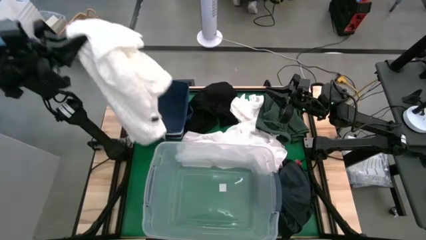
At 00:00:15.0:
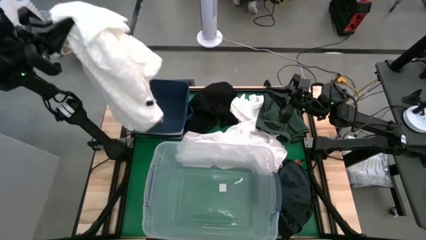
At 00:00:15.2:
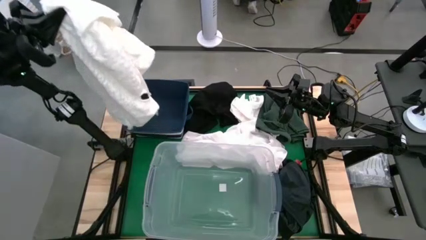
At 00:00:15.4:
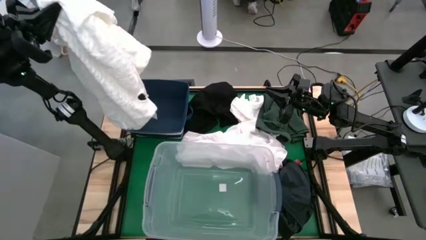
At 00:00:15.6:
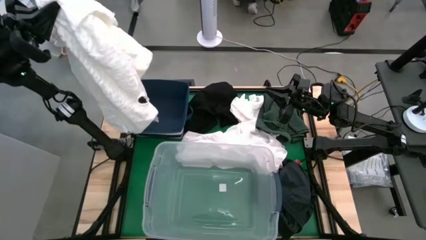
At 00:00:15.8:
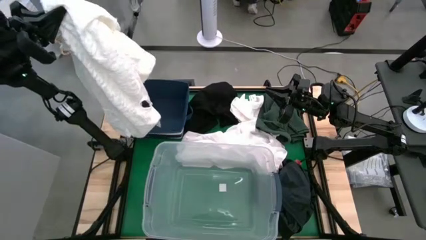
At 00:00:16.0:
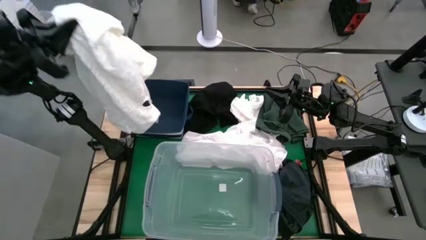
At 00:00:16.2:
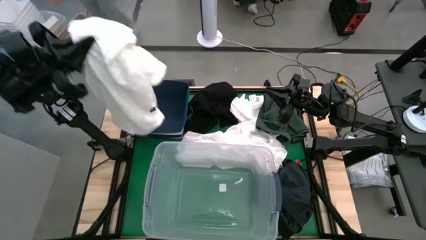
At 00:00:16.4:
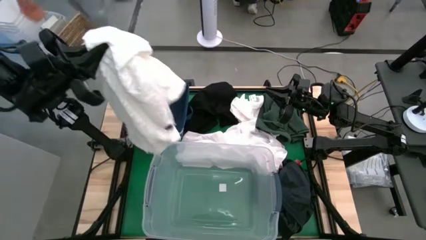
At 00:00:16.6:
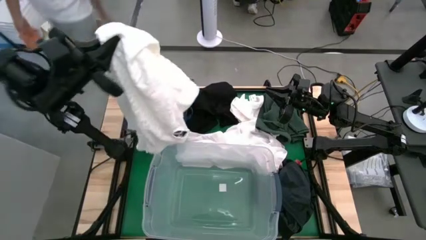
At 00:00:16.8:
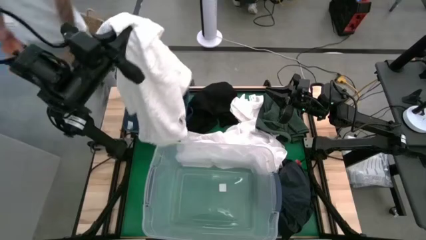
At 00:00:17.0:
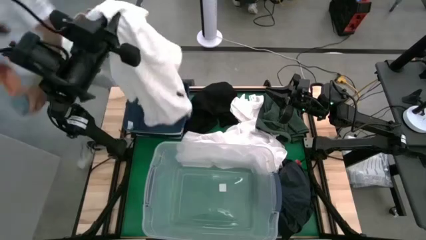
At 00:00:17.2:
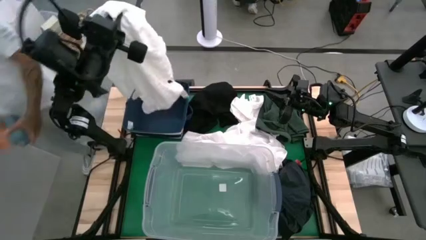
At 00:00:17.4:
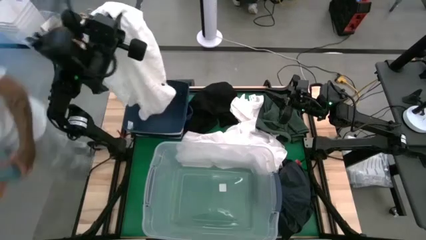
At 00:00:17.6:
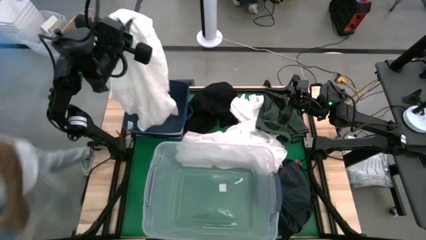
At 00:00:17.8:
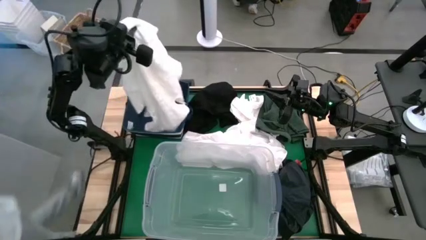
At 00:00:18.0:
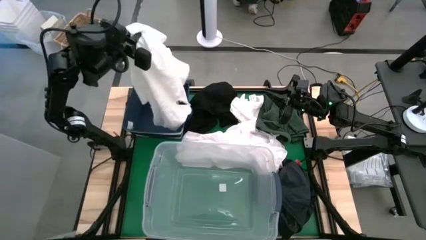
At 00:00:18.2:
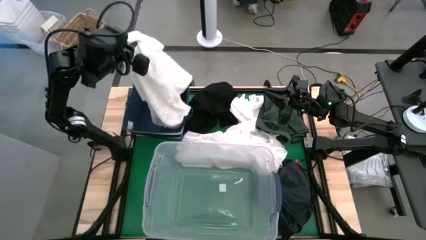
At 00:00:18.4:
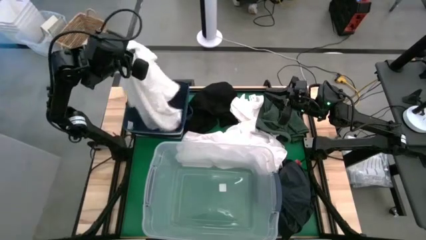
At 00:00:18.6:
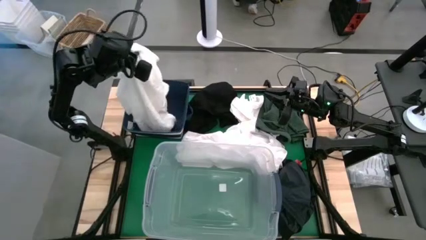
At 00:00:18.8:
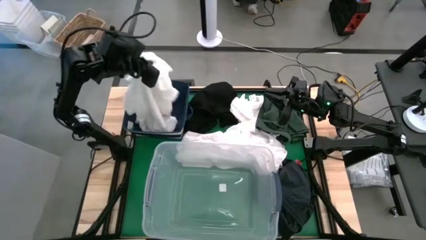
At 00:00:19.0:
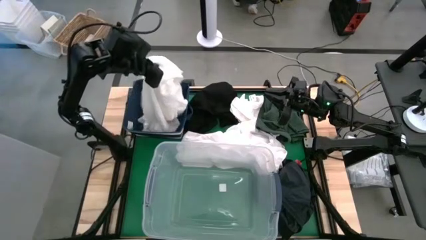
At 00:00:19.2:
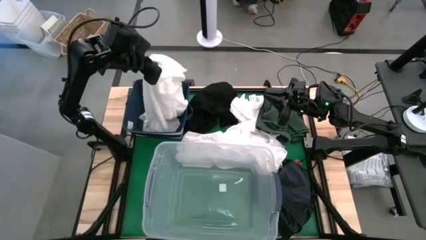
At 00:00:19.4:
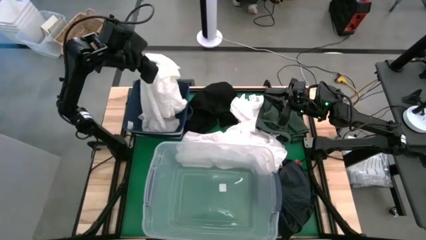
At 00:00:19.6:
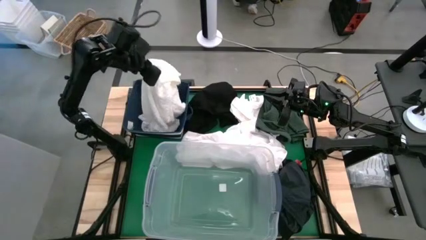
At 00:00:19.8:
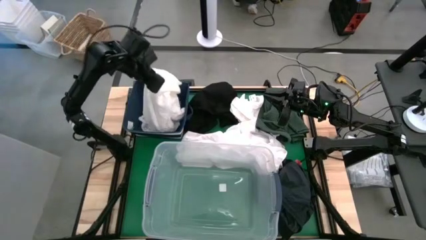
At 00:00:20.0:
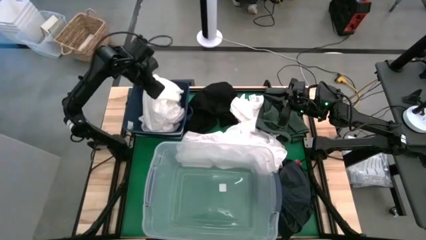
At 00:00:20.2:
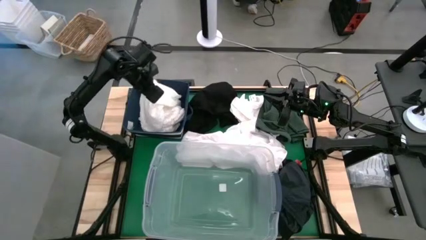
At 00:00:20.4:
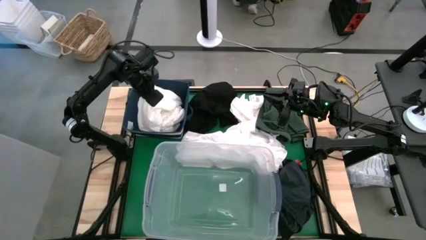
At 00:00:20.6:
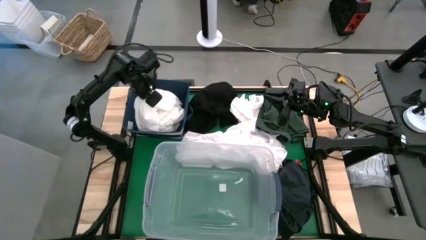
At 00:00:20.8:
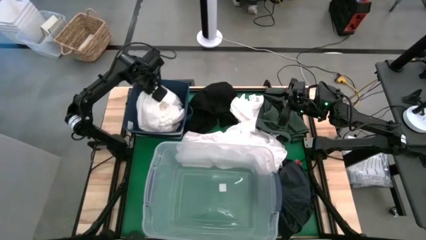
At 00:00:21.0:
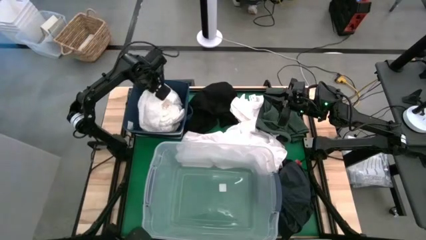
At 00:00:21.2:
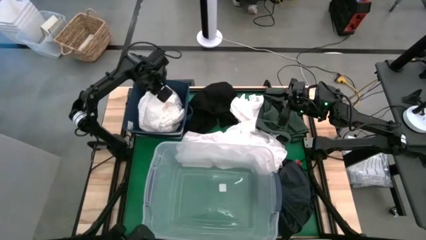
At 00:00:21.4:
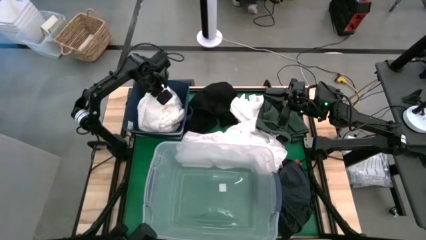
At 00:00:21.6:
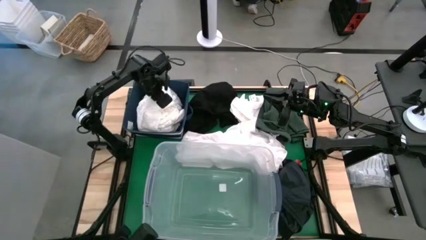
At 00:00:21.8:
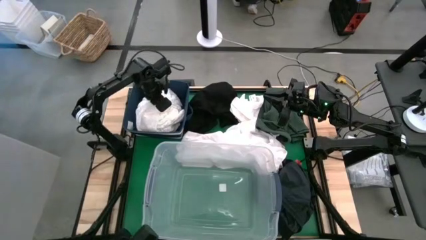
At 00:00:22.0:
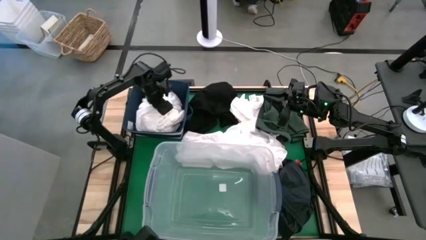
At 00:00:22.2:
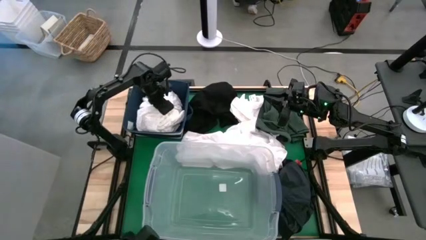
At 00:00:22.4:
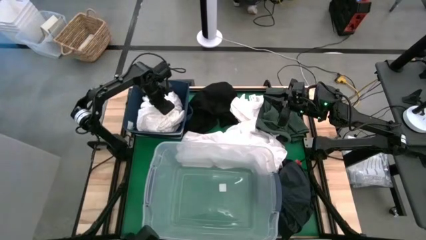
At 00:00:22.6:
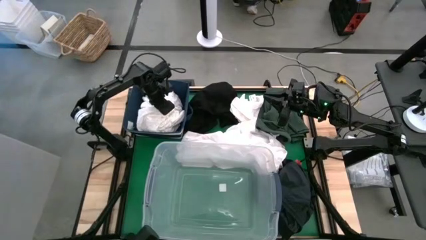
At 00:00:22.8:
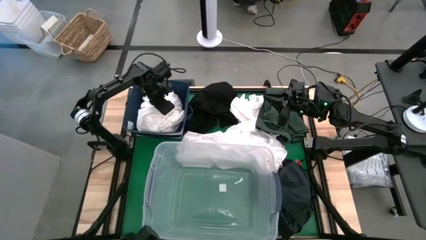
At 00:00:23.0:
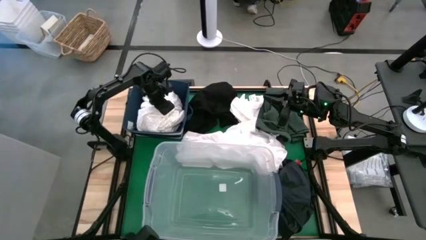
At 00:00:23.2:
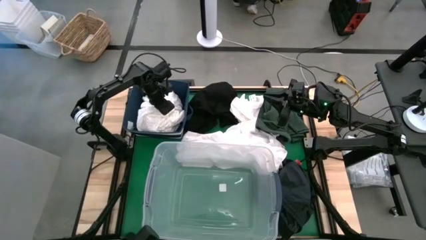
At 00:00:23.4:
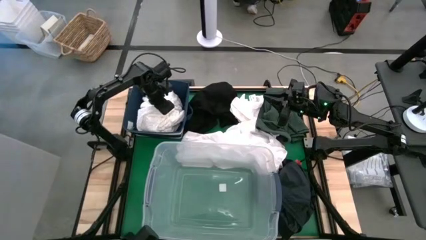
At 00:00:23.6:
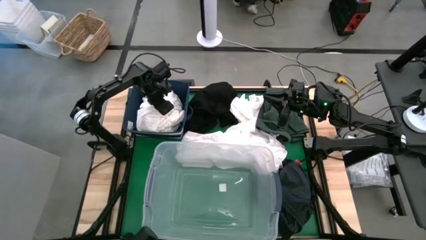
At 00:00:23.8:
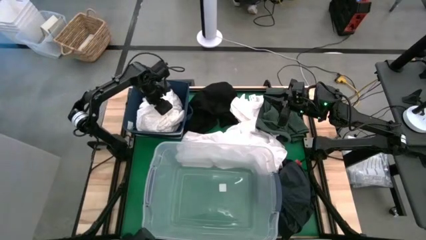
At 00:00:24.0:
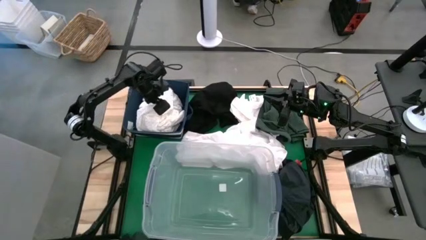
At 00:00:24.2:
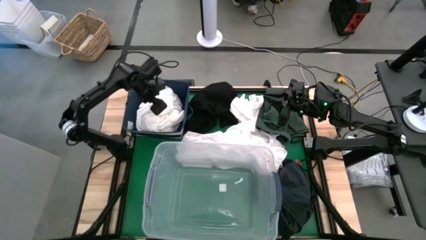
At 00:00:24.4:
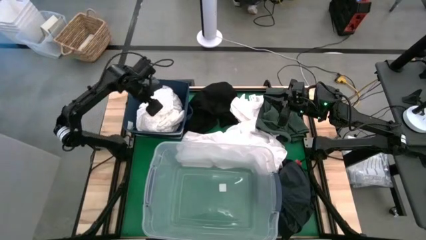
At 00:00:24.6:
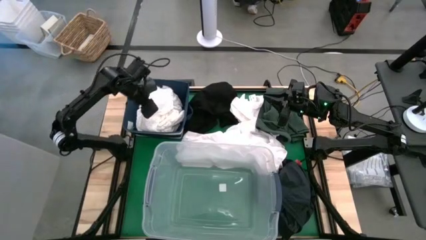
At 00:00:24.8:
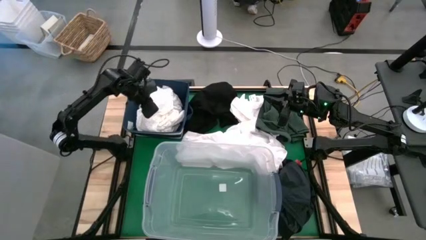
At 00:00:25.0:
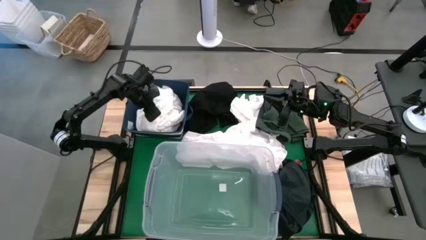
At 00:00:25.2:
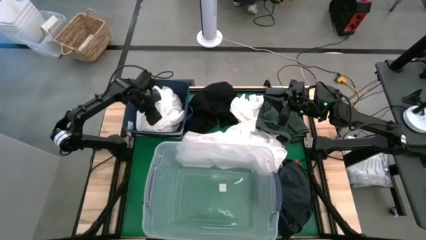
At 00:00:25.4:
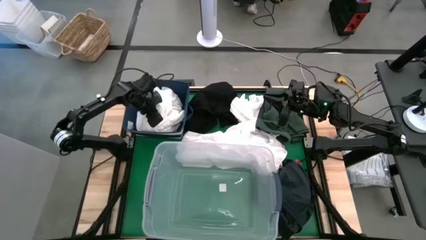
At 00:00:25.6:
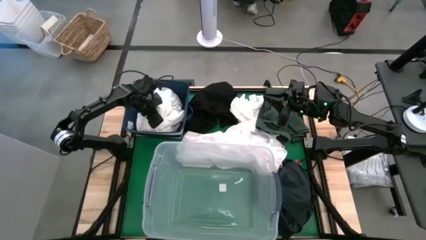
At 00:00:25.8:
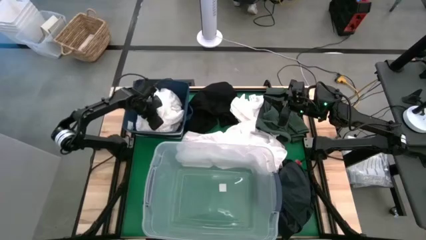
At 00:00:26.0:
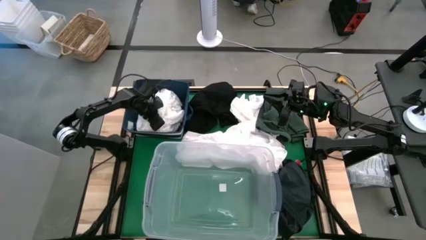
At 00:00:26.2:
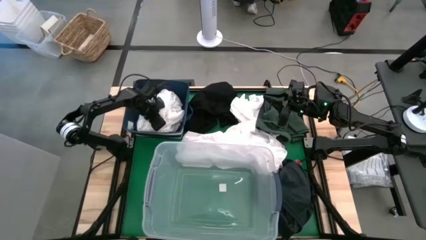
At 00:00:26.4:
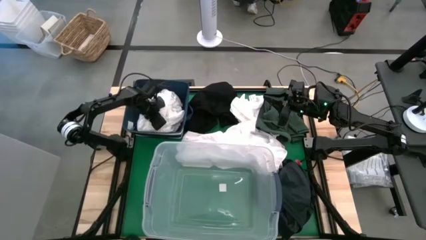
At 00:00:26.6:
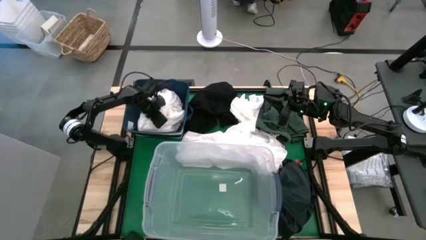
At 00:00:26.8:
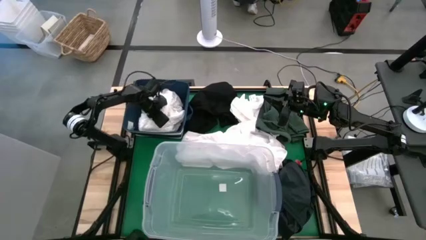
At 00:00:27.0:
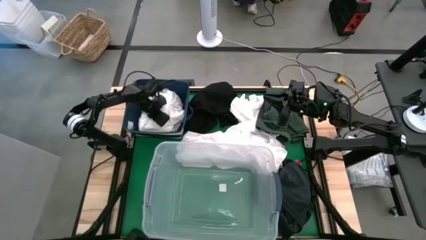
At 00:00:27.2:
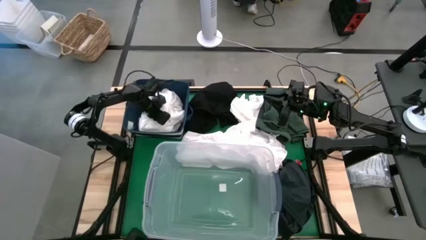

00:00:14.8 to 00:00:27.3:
Put the white blouse into the blue laundry bin
